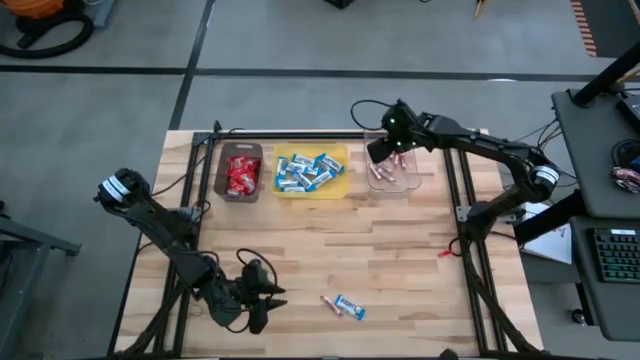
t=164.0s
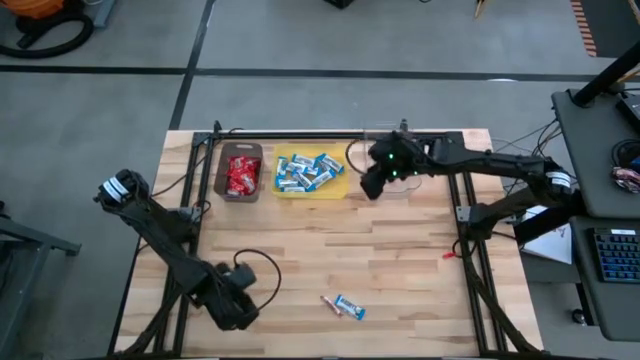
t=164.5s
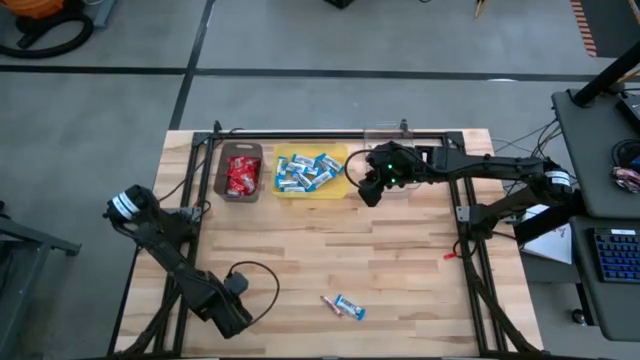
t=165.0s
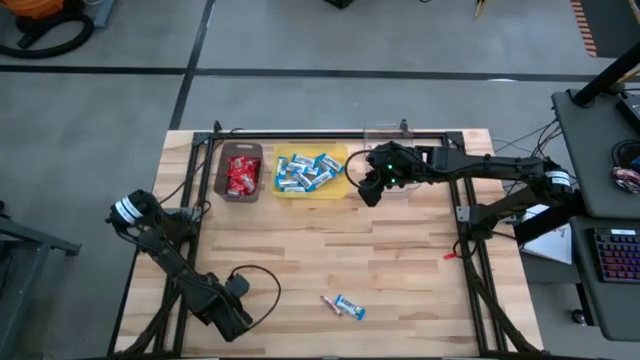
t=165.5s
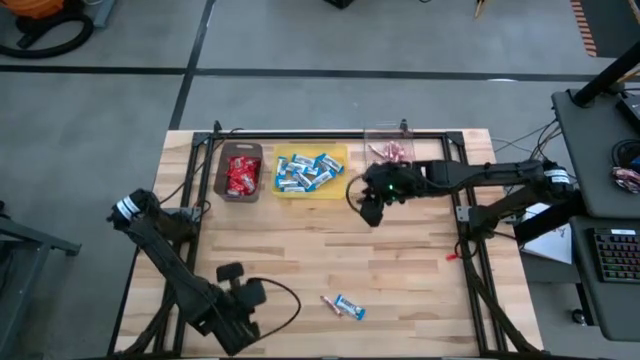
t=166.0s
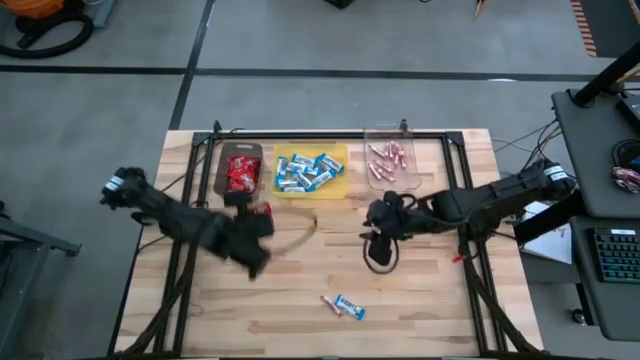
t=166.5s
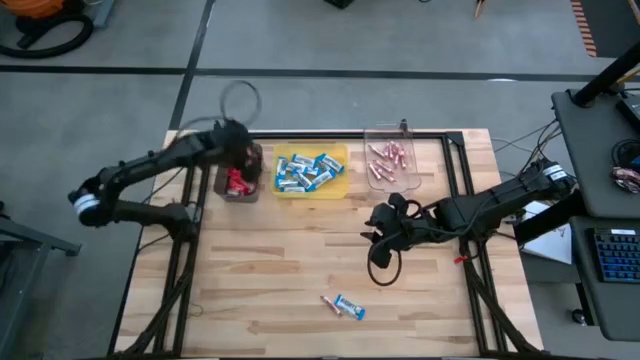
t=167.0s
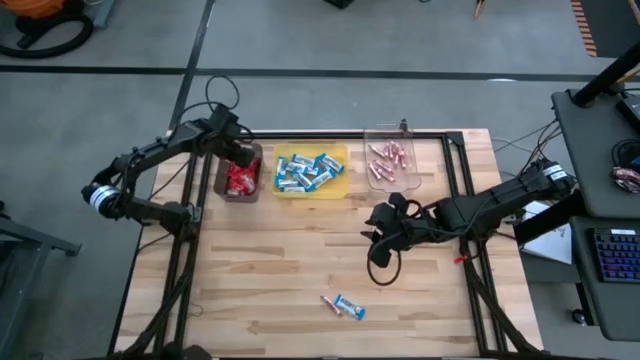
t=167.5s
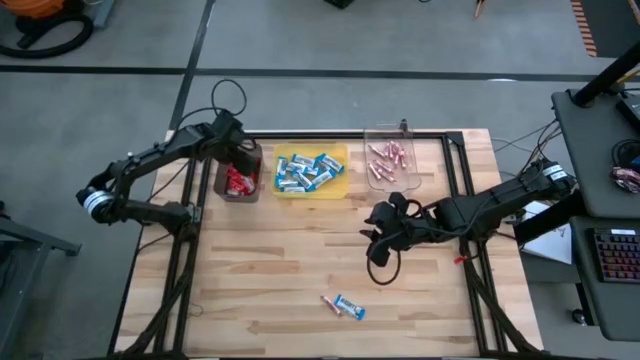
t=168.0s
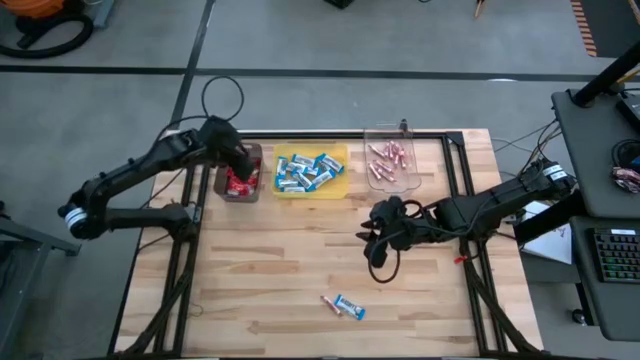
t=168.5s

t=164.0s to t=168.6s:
Task: Sort candy
Put the red candy into the black bin

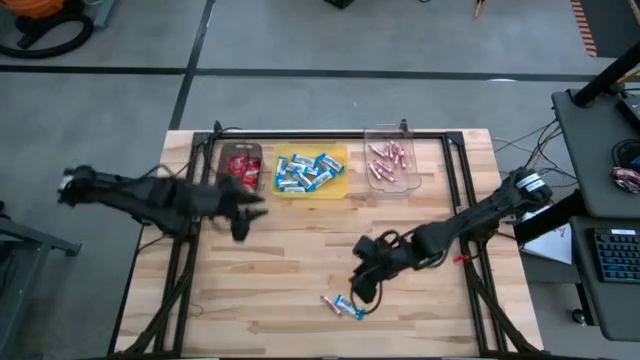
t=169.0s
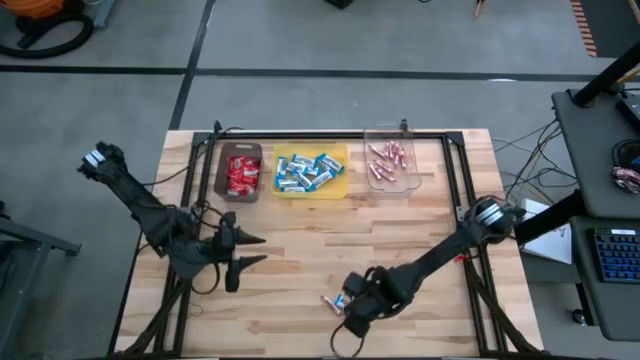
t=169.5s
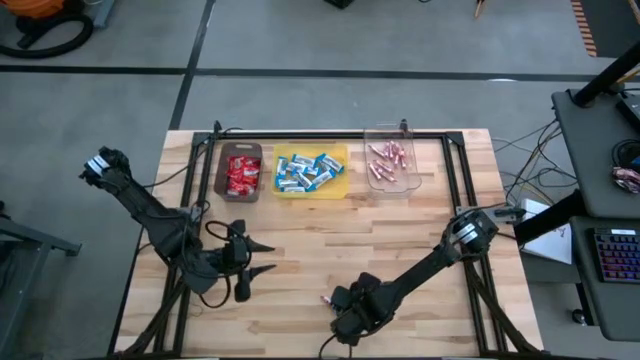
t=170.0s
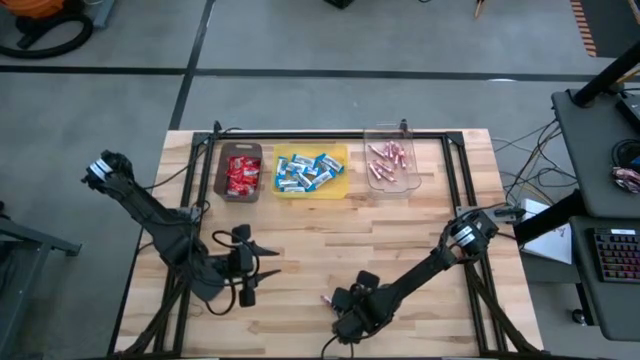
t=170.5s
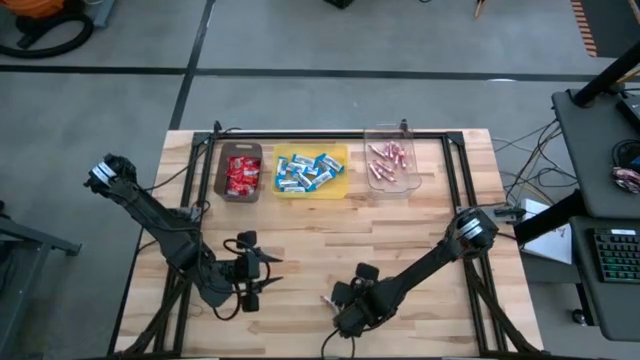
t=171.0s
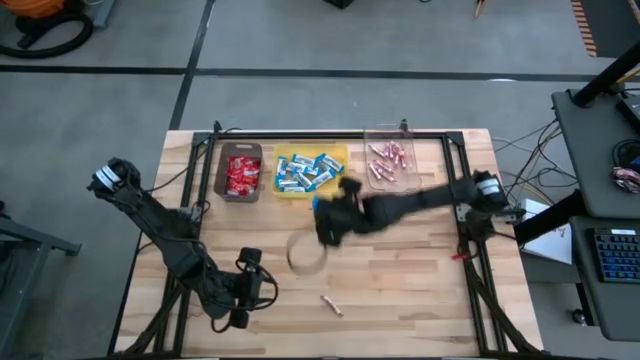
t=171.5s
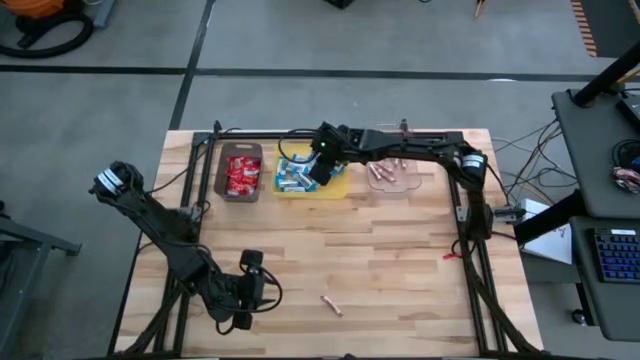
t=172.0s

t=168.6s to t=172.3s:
Put the white candy into the yellow bin

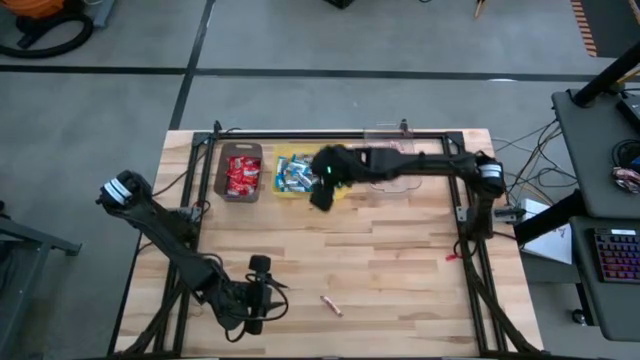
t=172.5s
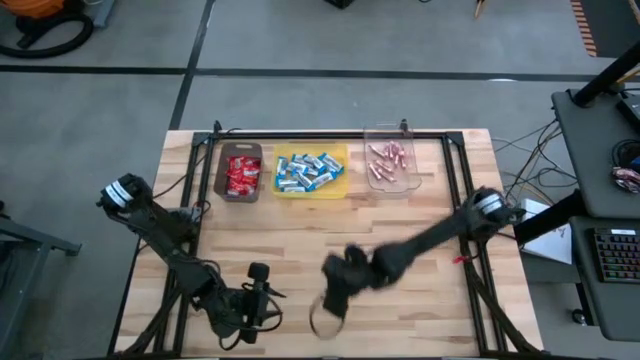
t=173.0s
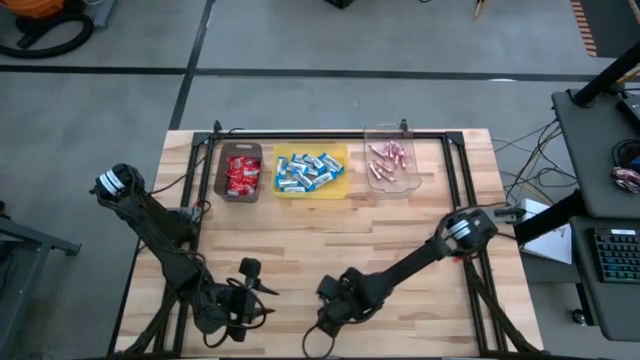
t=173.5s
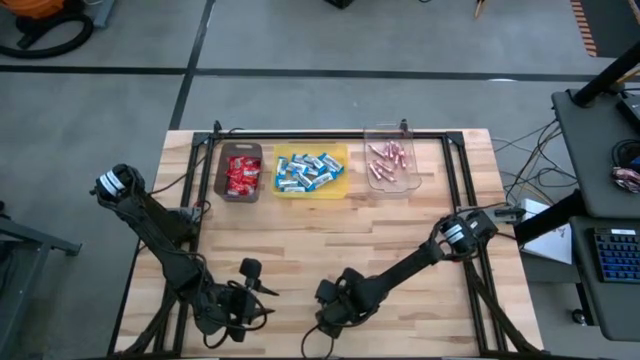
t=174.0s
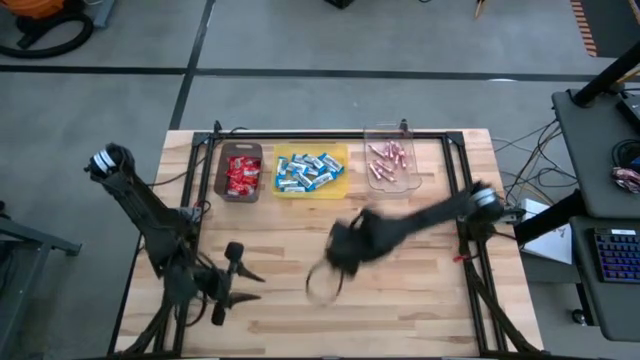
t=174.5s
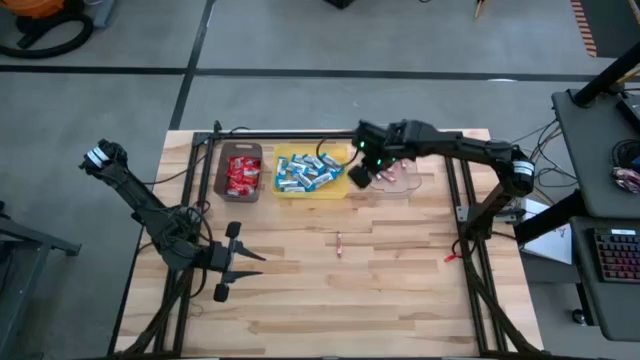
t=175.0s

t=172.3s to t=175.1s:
Put the orange candy into the transparent bin

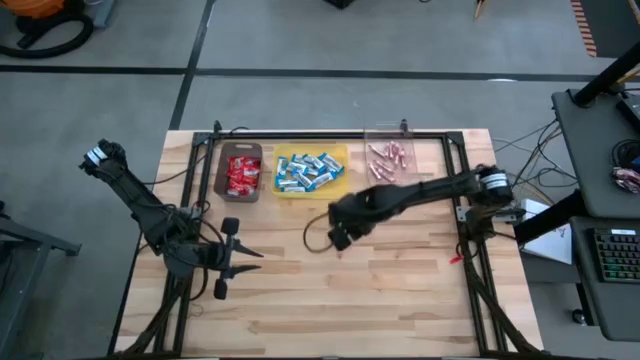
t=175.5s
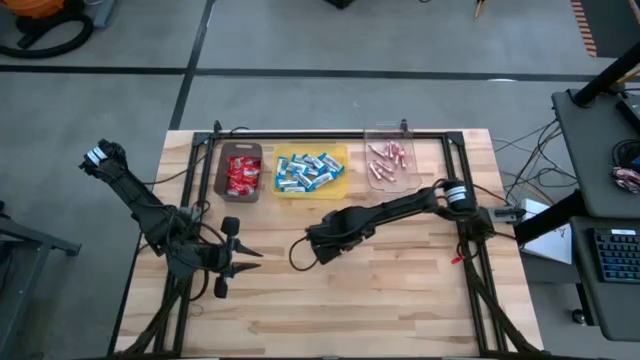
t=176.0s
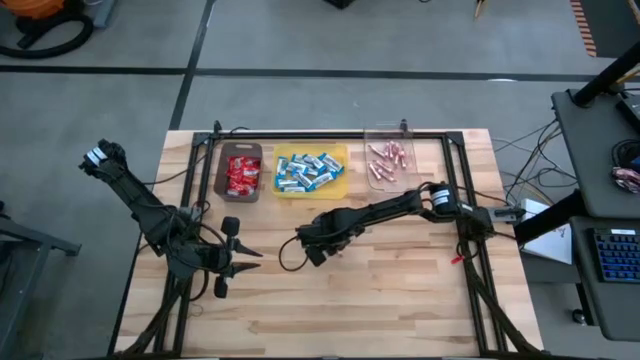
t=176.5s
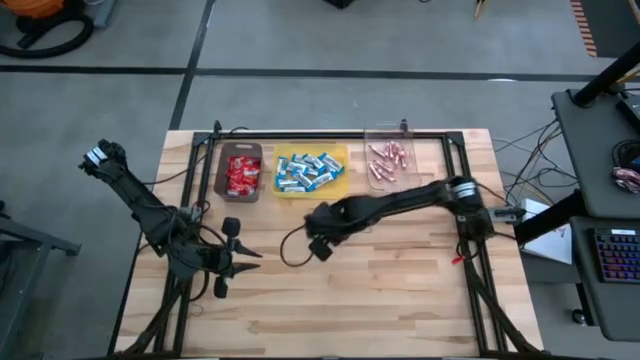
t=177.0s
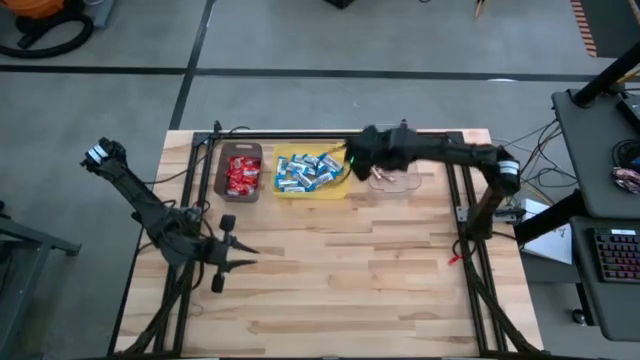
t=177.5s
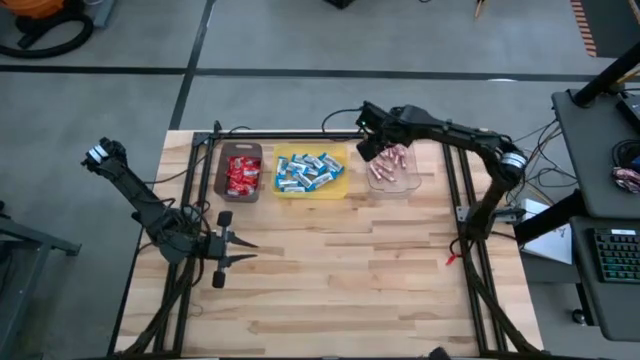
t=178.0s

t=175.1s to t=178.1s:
Put the orange candy into the transparent bin

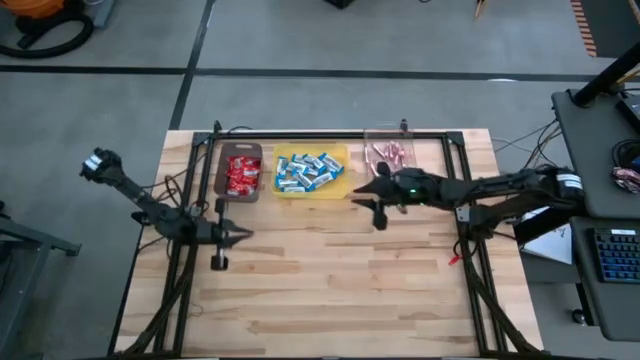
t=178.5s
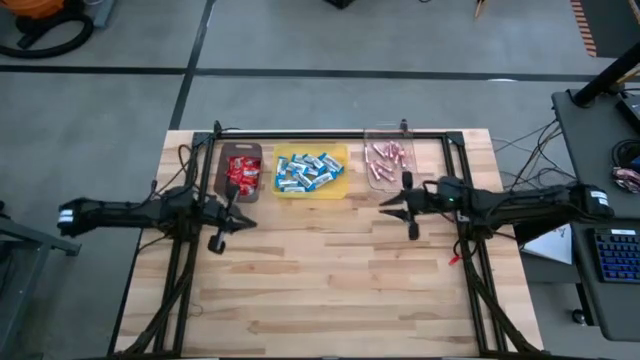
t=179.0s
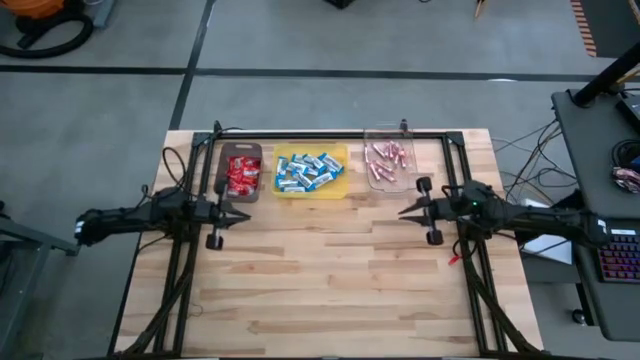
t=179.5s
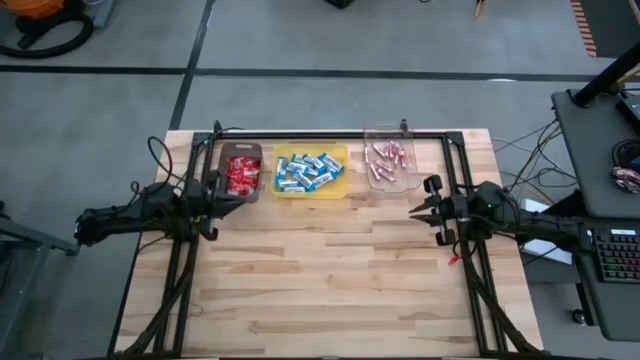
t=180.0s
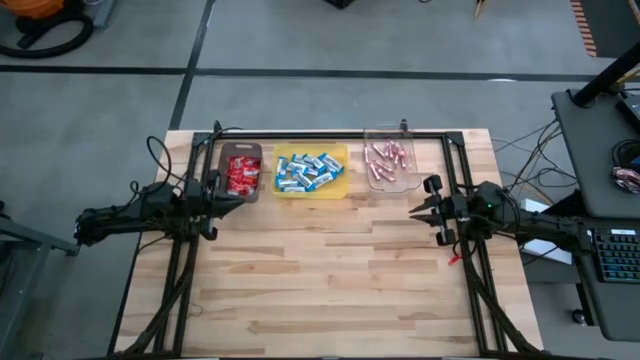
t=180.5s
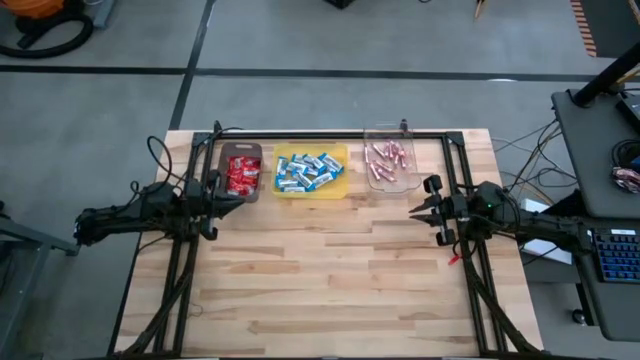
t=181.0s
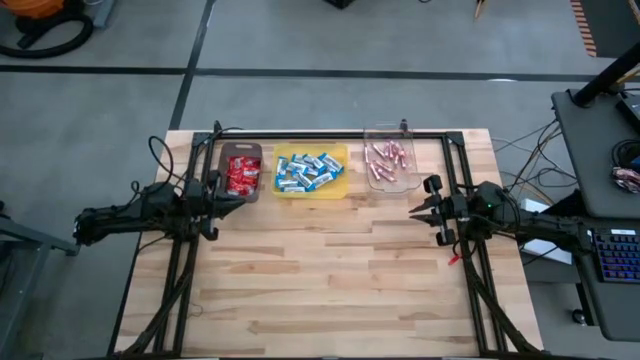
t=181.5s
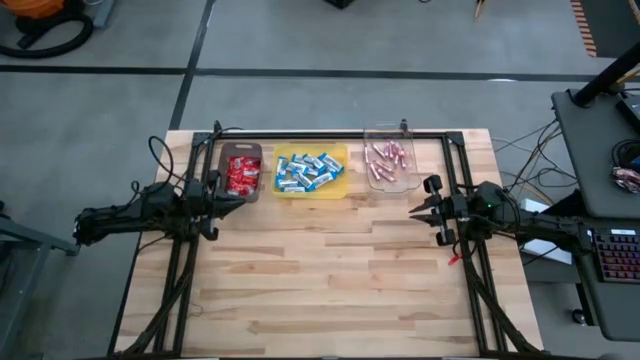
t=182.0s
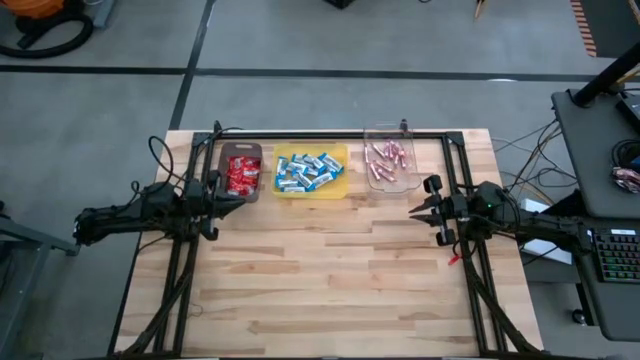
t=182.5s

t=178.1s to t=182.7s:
Return to Home Position

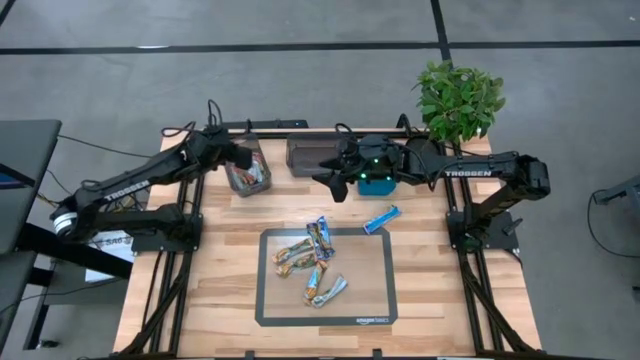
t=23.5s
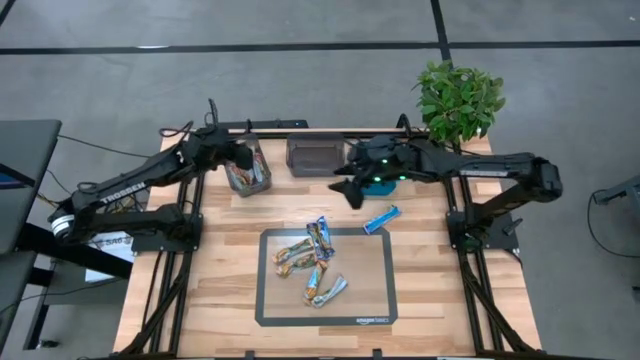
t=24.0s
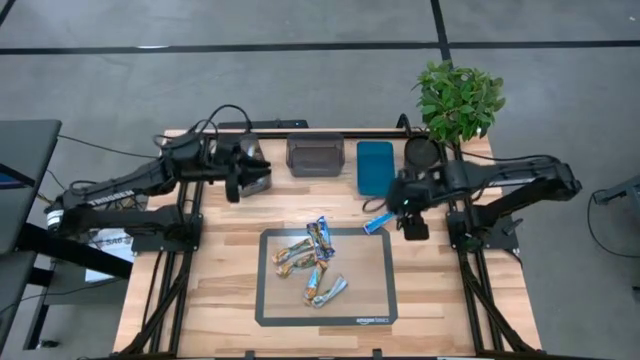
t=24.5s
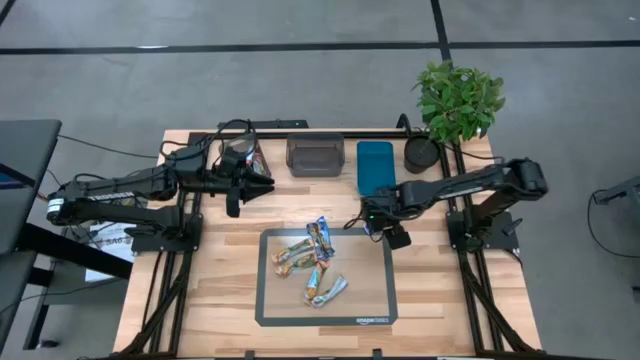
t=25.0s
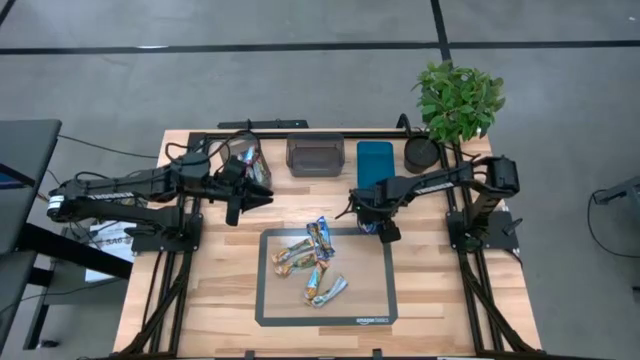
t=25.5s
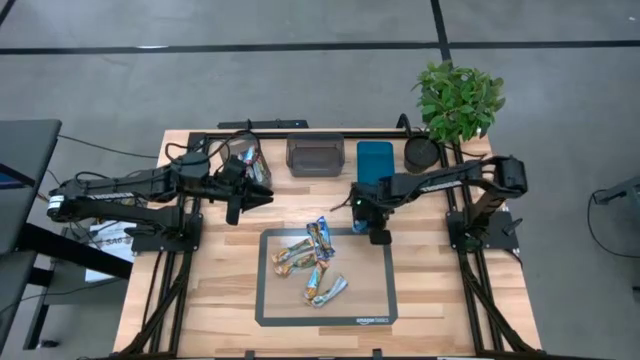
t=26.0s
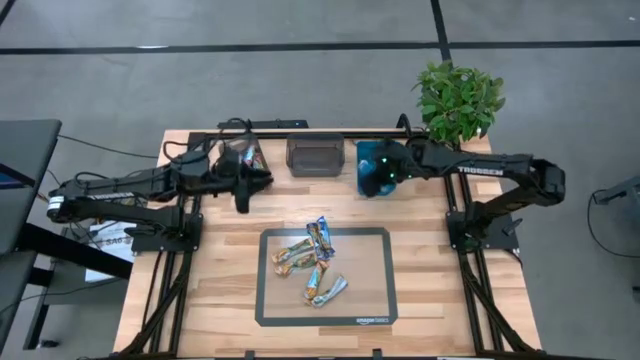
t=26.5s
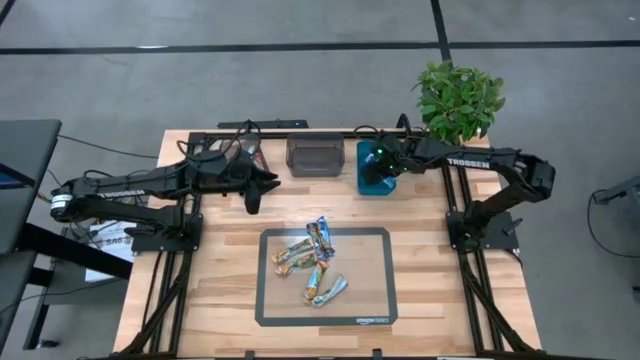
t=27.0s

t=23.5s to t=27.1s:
Task: Pick and place Granola Bars by type
Put the blue granola bar into the blue bin
